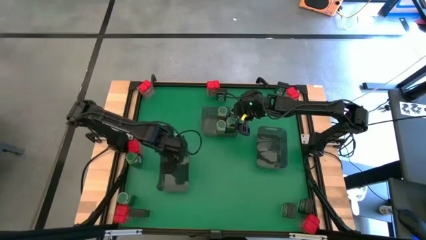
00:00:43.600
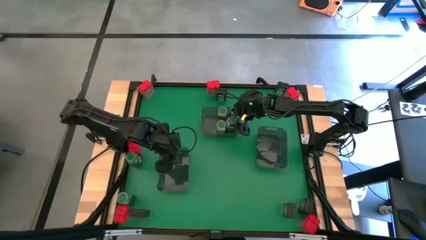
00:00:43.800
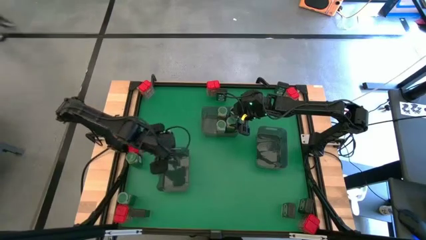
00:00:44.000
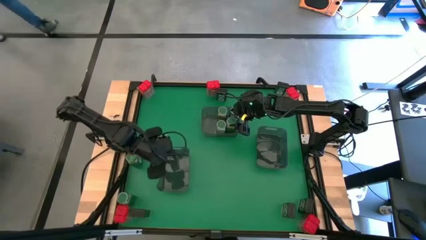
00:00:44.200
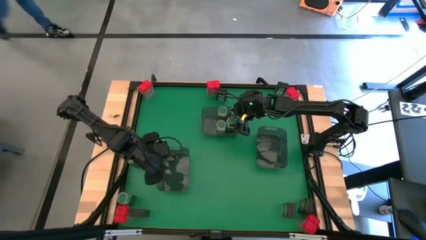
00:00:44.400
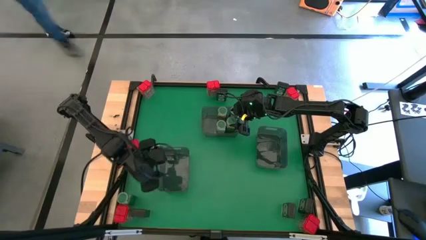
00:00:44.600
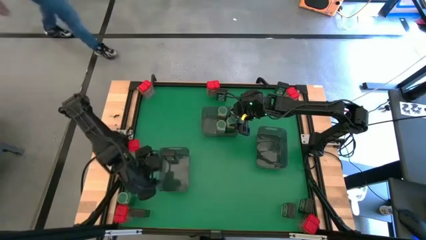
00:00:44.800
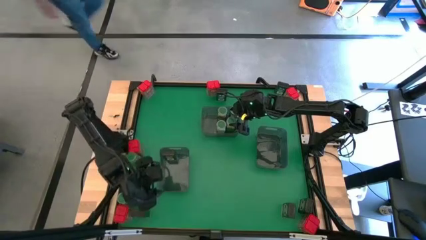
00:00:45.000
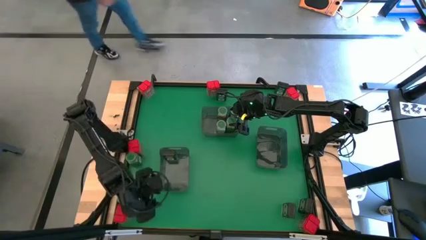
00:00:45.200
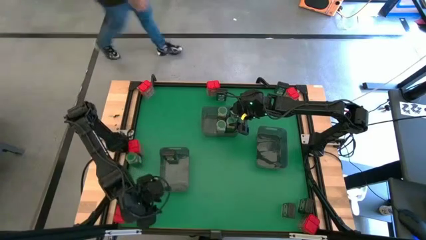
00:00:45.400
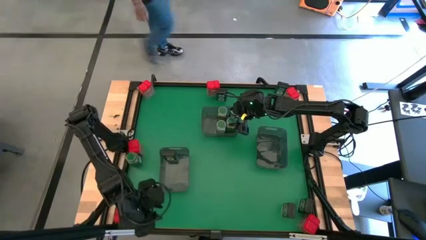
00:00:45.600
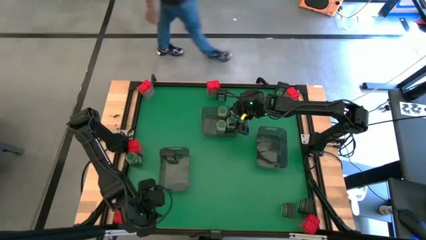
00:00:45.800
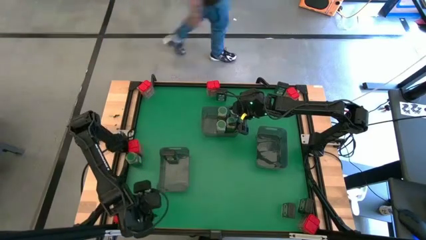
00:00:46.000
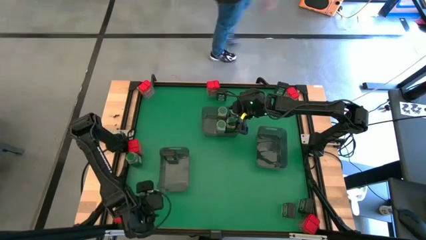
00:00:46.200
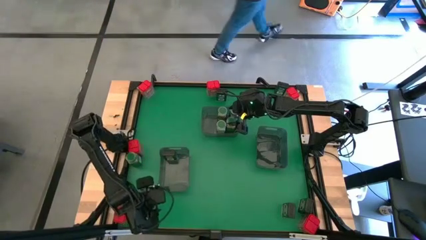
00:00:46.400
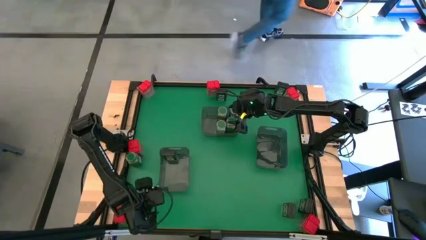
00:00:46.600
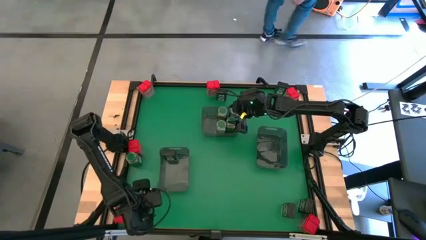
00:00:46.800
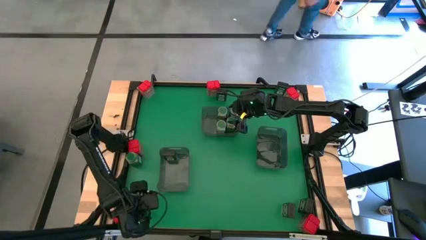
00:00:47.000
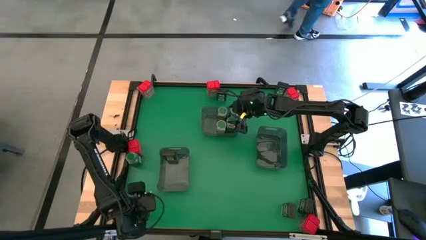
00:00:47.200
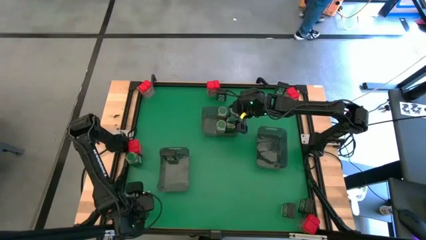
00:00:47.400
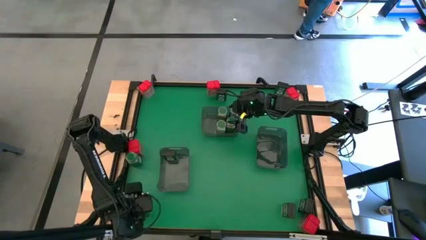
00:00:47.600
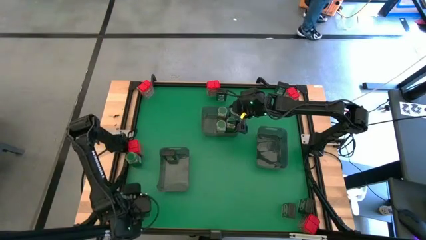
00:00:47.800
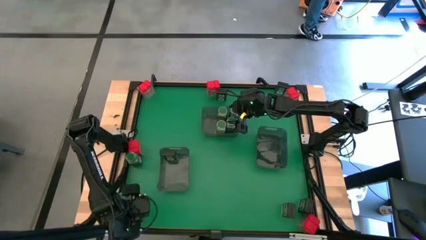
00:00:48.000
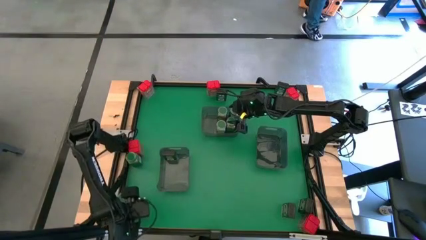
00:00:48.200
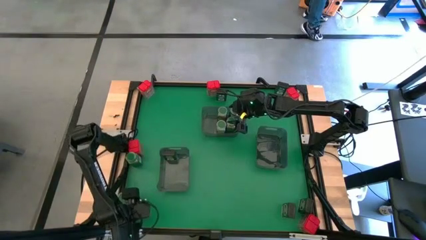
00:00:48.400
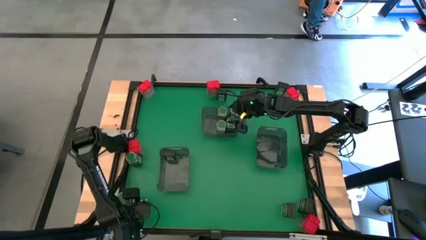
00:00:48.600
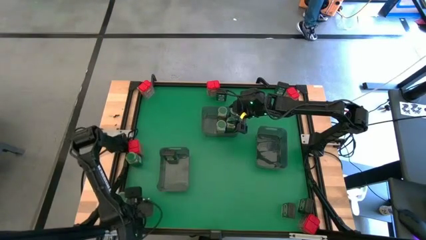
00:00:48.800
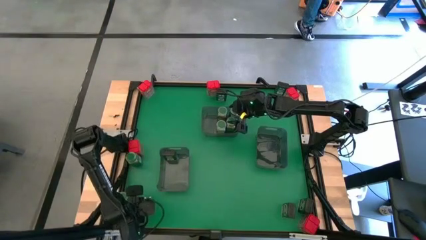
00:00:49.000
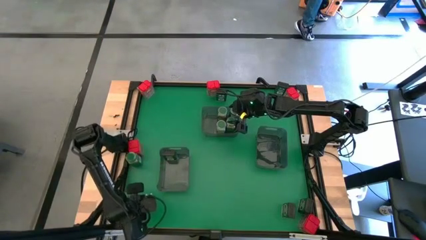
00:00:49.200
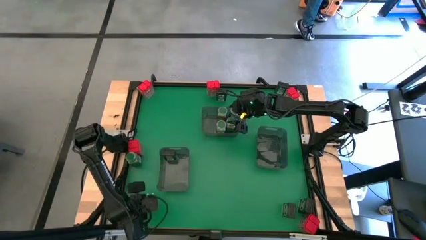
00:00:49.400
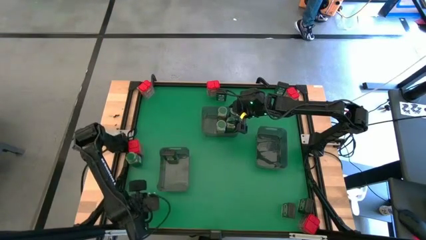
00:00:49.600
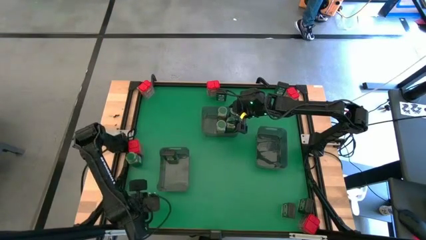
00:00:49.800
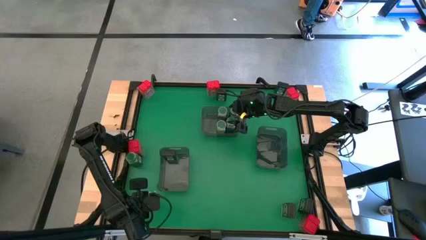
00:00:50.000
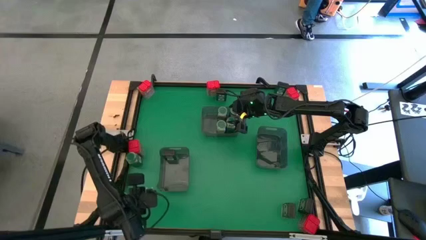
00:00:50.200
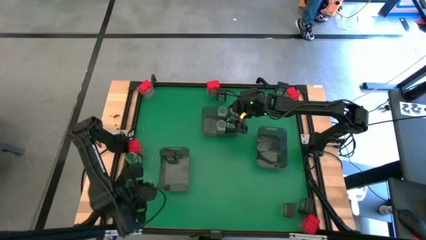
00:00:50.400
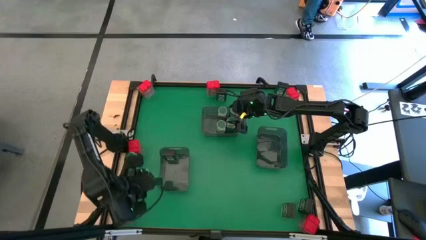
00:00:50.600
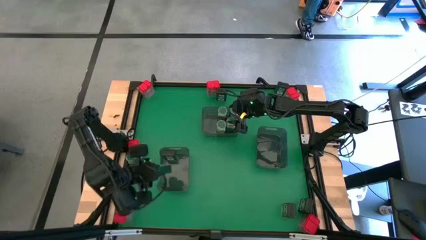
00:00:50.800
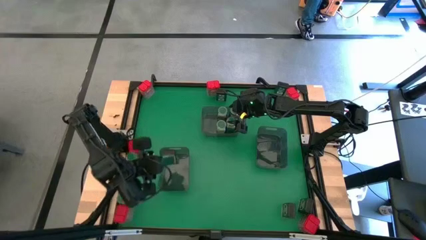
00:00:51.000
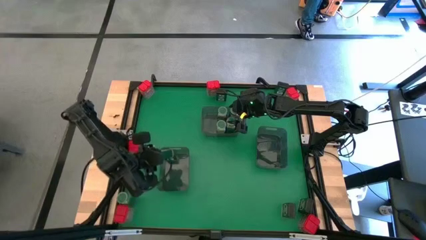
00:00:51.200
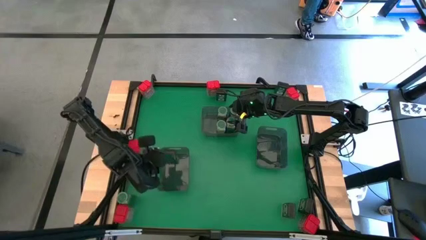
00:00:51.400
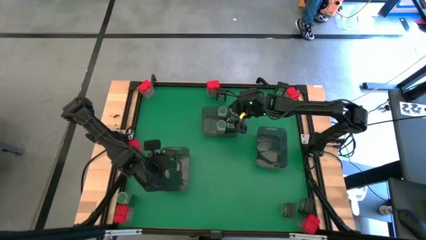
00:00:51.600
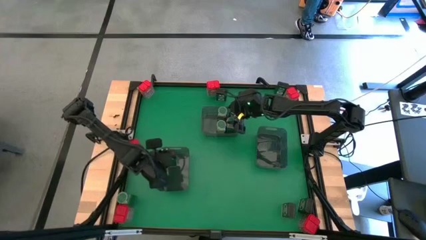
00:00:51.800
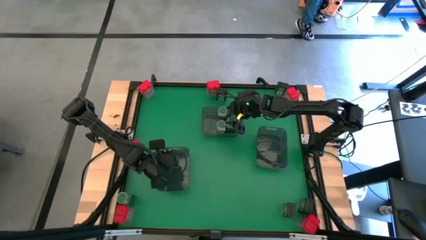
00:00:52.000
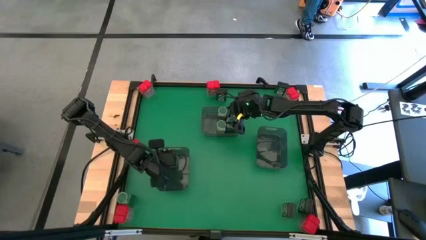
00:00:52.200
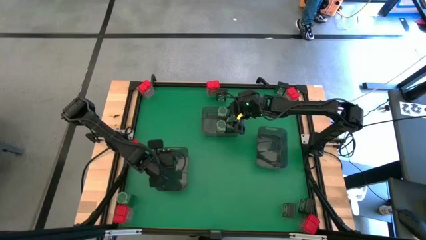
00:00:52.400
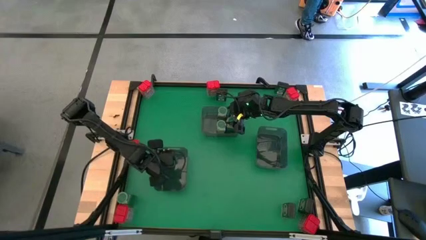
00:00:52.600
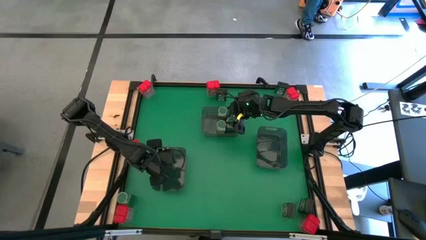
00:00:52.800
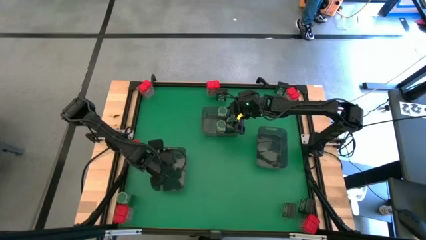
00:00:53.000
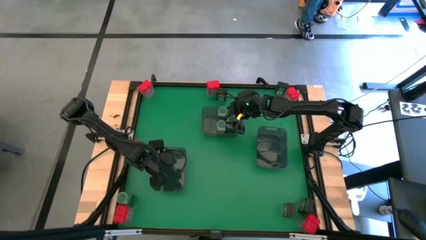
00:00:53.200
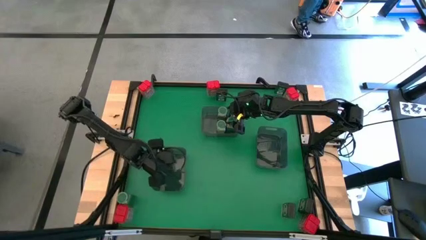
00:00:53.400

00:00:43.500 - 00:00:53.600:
Task: Sort spices by type
Put the black seasoning can into the left black bin

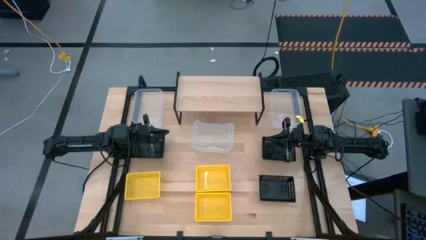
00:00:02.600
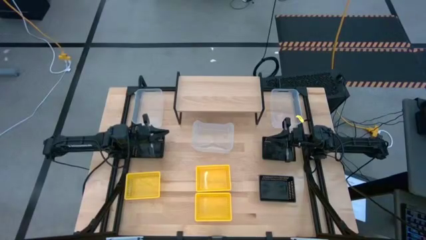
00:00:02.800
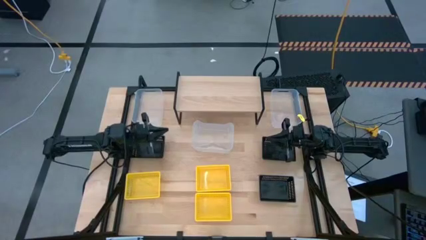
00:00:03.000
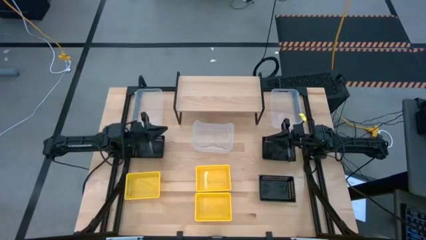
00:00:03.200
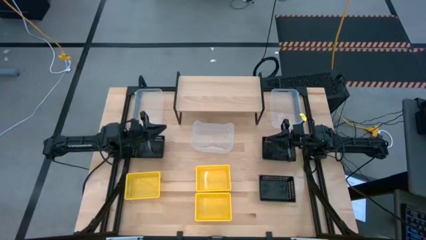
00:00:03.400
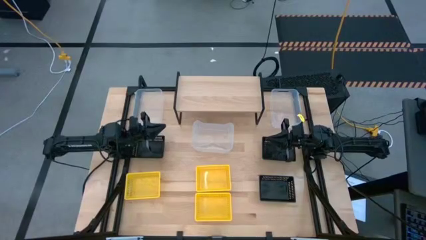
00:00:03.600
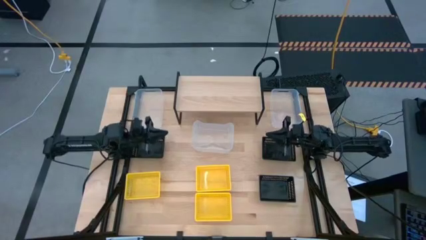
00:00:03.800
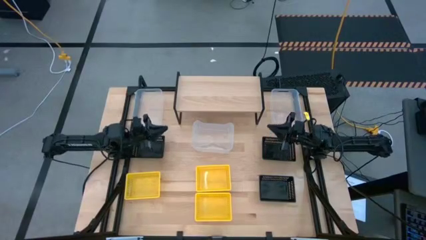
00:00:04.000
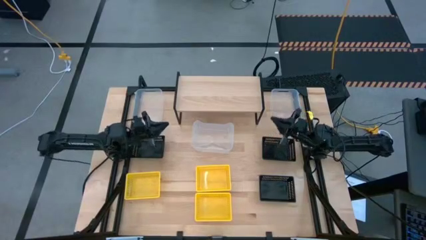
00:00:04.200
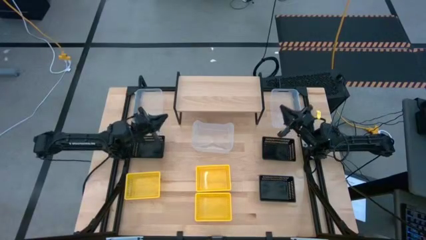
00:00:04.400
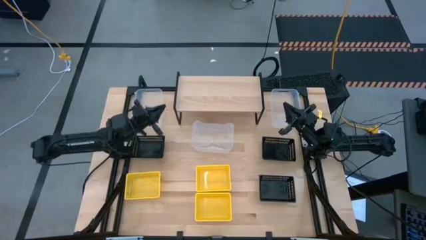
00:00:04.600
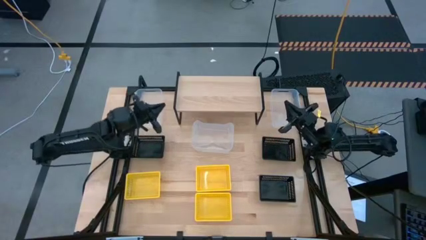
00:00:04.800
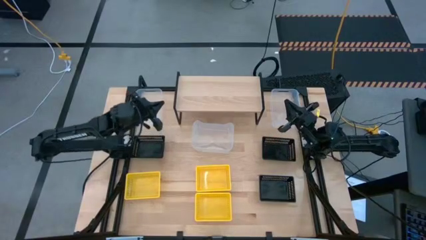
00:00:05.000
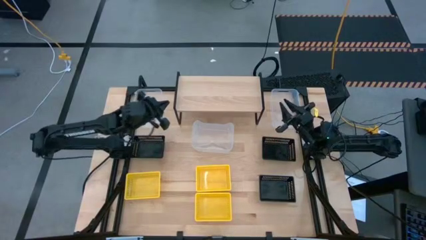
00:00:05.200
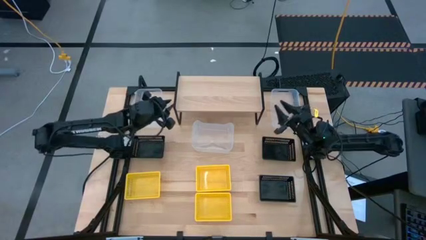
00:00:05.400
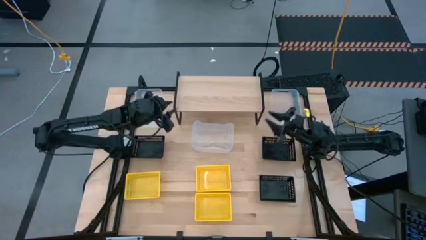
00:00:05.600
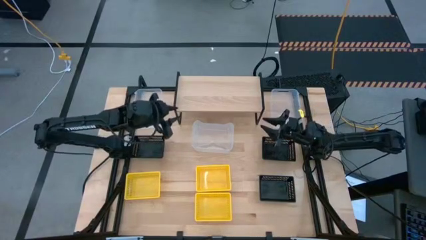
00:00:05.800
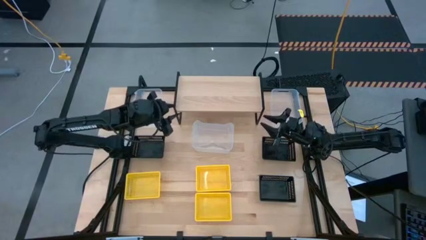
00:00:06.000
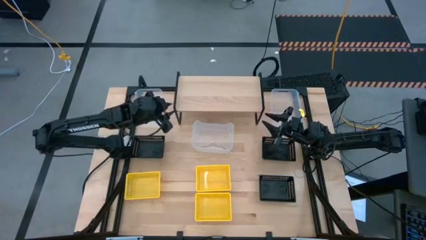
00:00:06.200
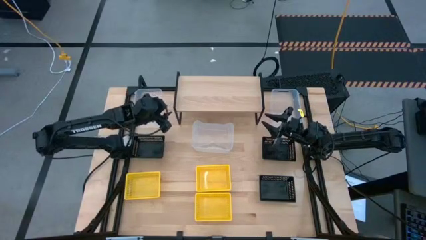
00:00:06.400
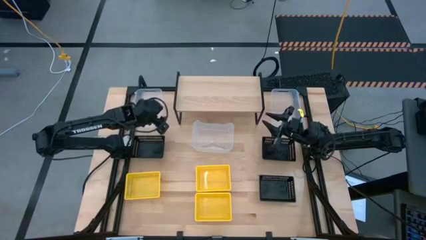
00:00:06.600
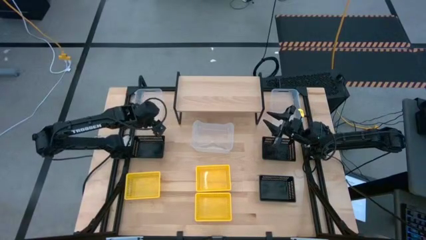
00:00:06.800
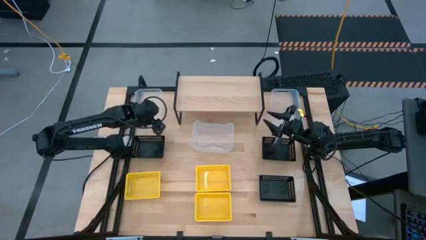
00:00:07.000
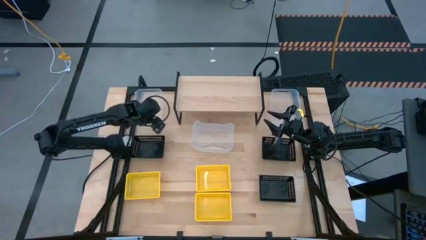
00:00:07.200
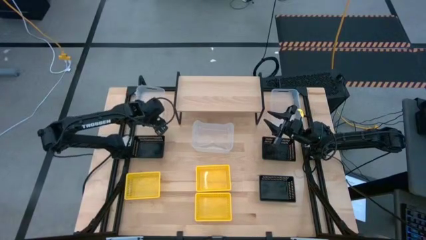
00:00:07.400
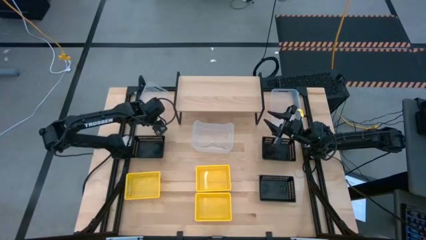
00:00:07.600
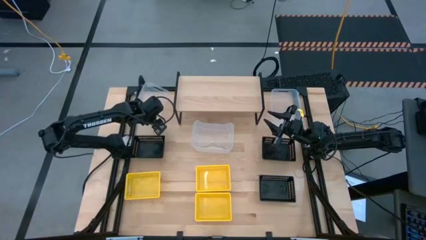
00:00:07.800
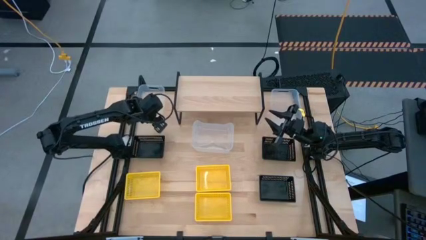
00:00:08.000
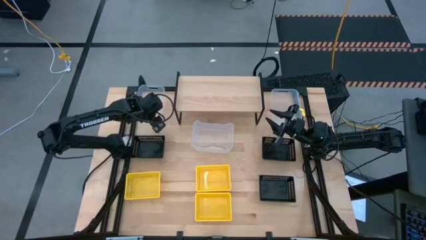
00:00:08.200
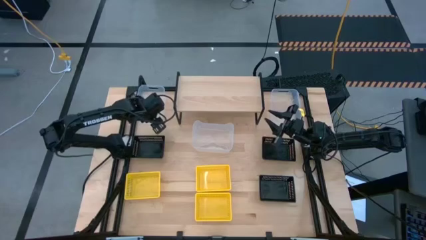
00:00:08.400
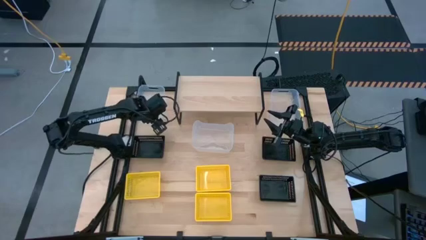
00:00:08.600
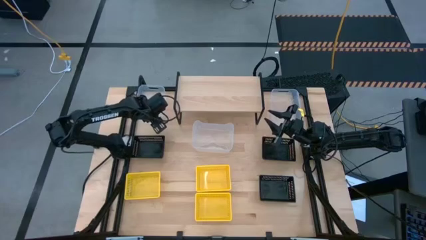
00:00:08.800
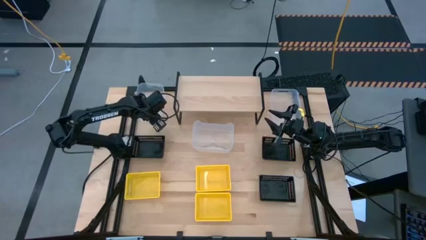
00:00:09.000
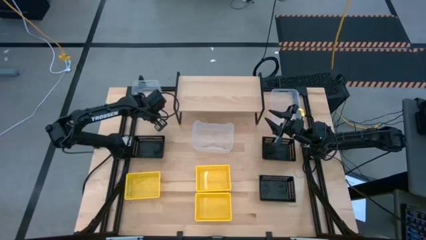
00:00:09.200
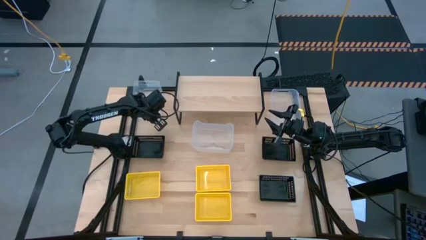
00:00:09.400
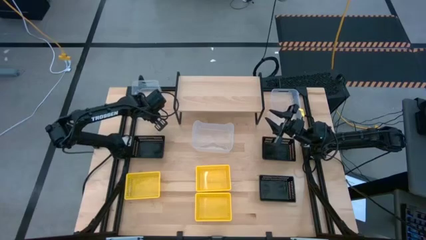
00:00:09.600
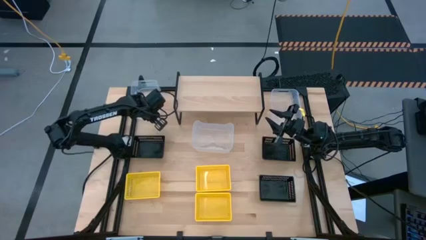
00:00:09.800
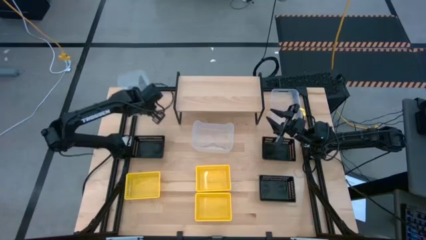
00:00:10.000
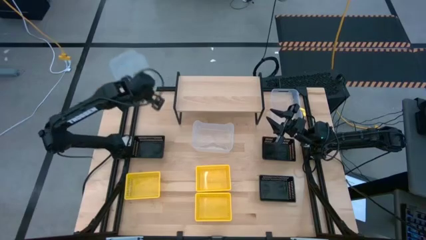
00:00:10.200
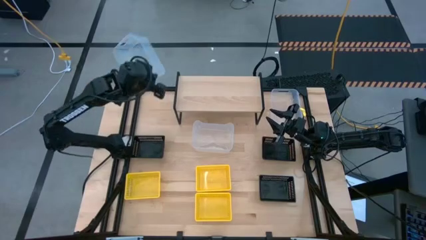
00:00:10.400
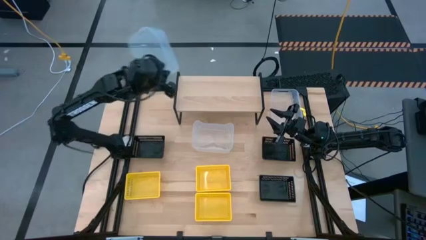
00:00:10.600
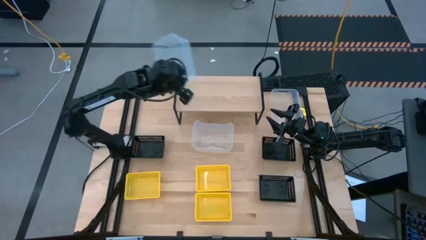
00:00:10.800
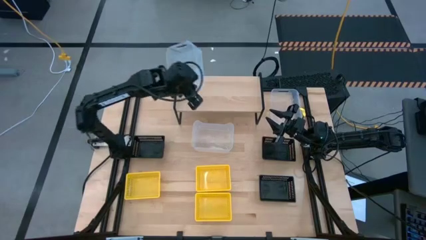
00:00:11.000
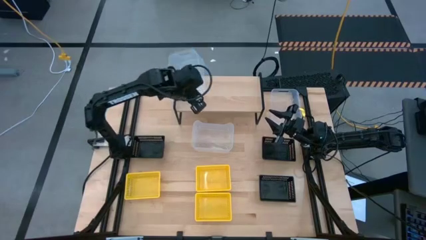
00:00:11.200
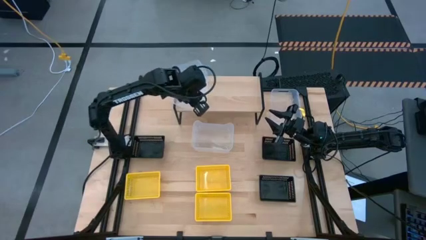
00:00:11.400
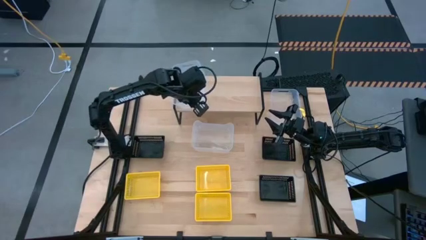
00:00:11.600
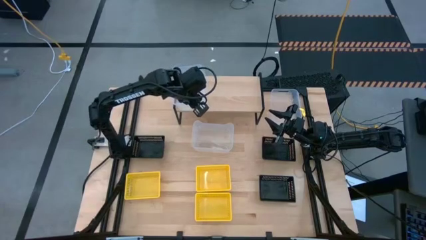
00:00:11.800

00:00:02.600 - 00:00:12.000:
Task: Stack baskets on shelf by color
Put the left transparent bin on the shelf
